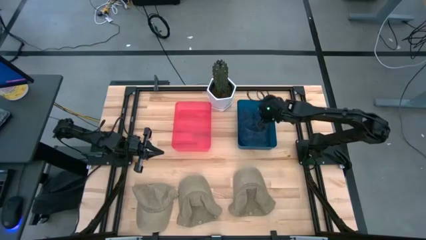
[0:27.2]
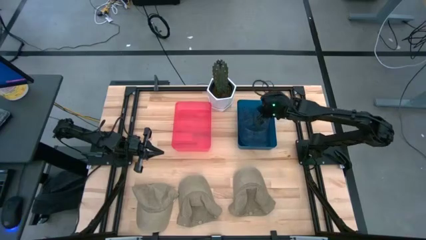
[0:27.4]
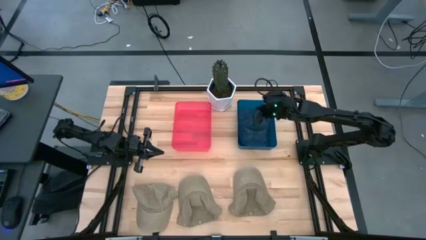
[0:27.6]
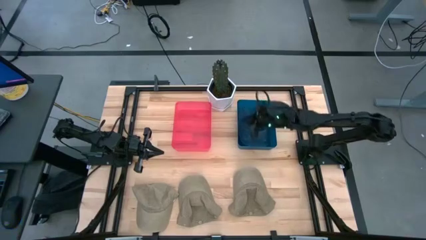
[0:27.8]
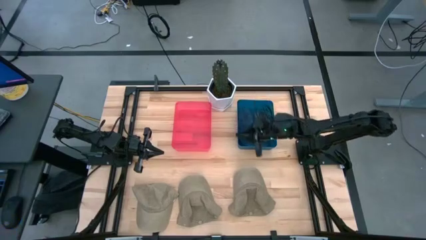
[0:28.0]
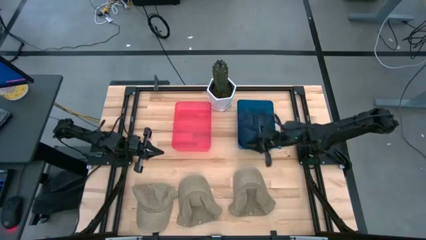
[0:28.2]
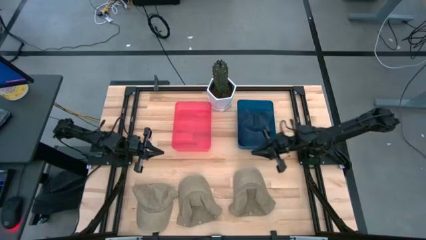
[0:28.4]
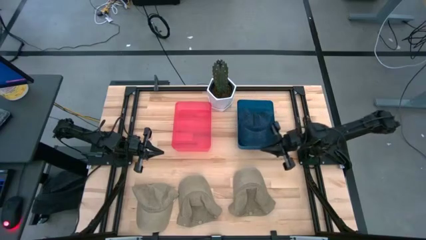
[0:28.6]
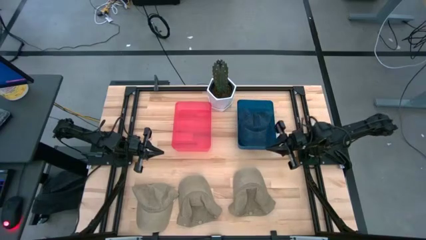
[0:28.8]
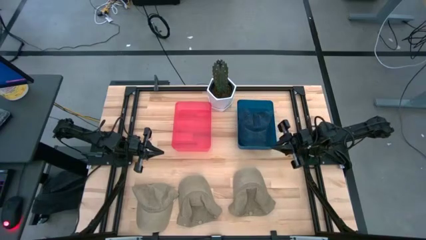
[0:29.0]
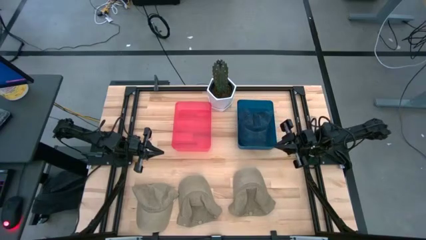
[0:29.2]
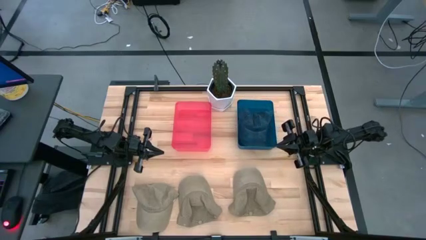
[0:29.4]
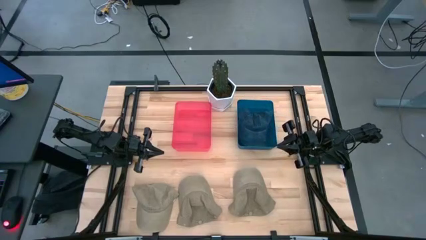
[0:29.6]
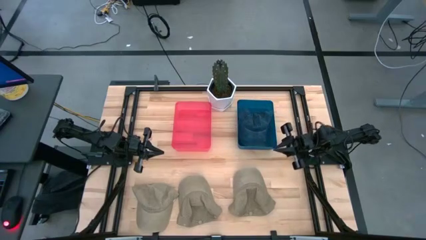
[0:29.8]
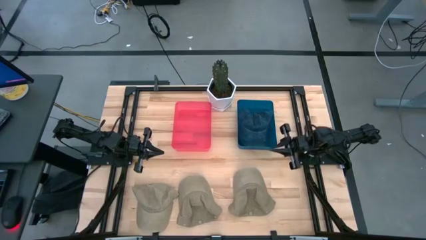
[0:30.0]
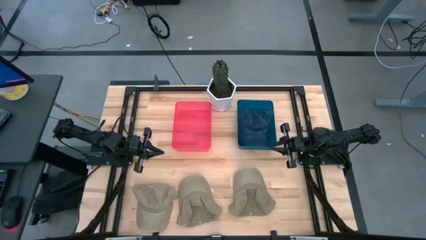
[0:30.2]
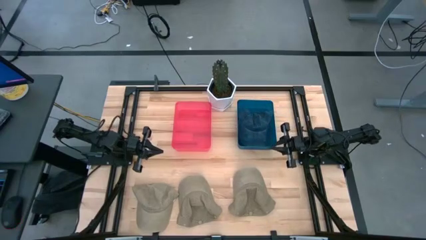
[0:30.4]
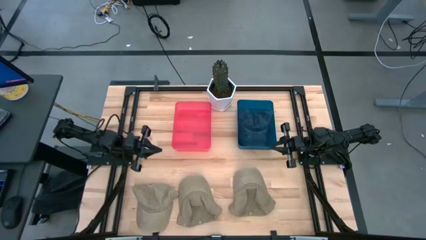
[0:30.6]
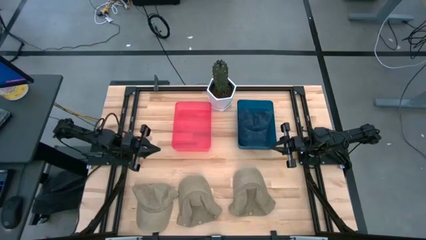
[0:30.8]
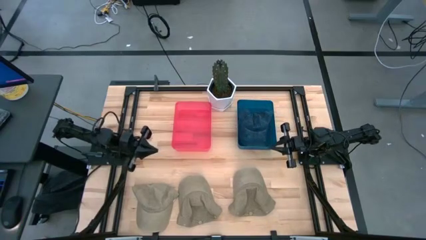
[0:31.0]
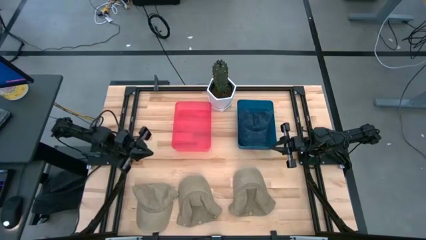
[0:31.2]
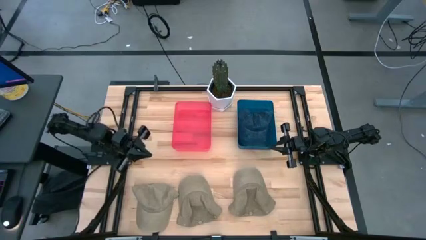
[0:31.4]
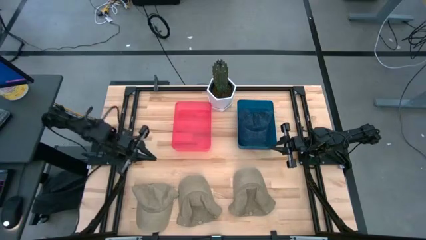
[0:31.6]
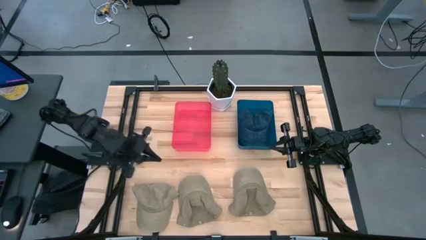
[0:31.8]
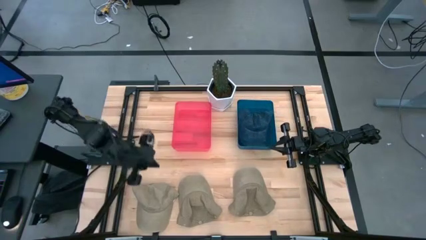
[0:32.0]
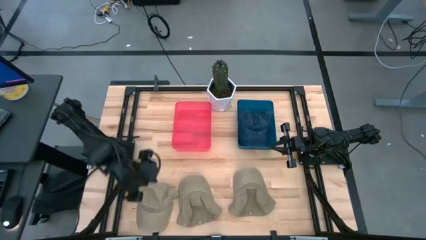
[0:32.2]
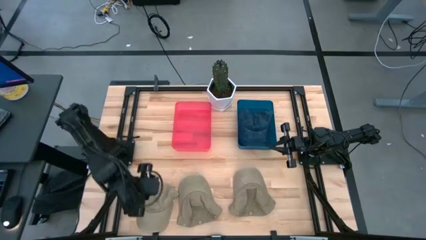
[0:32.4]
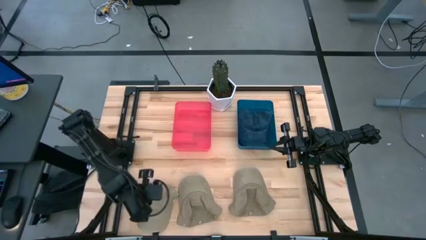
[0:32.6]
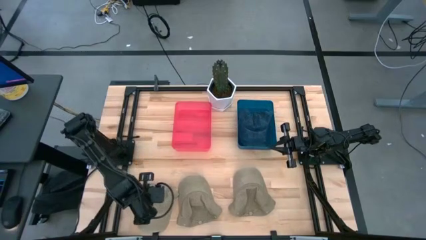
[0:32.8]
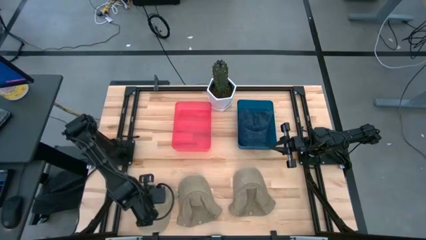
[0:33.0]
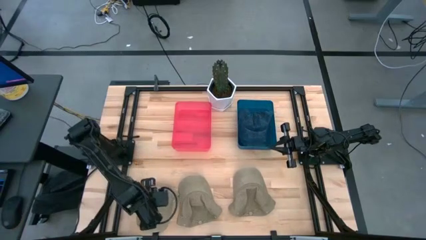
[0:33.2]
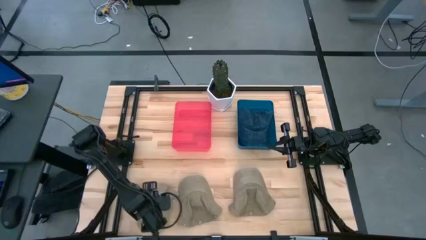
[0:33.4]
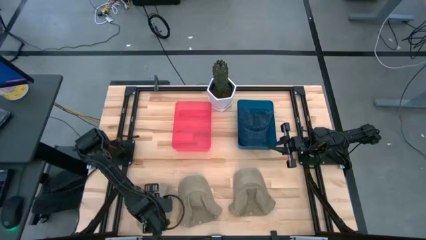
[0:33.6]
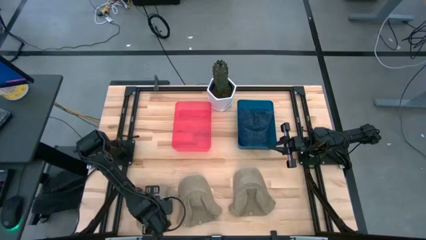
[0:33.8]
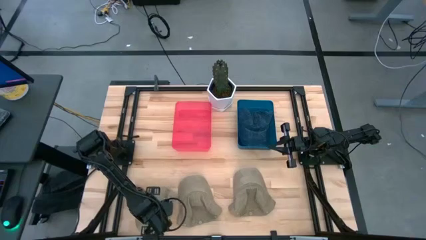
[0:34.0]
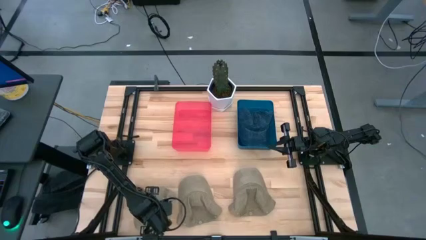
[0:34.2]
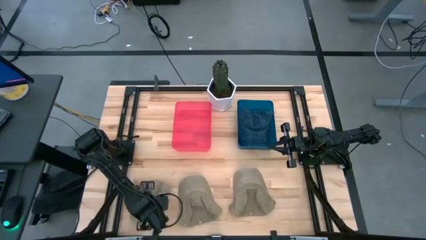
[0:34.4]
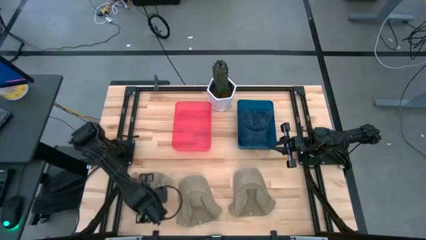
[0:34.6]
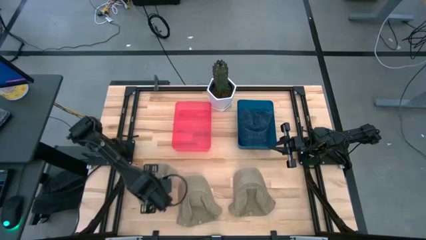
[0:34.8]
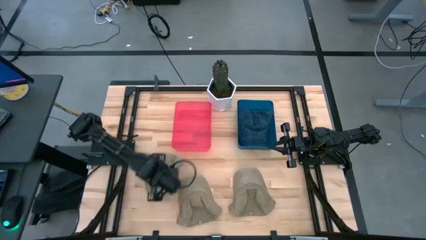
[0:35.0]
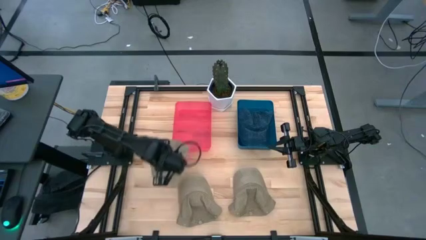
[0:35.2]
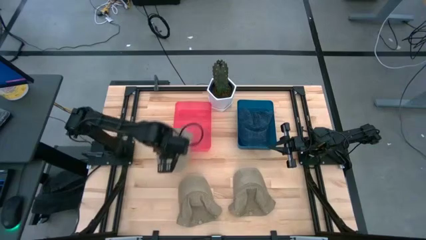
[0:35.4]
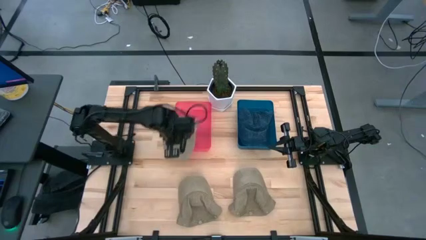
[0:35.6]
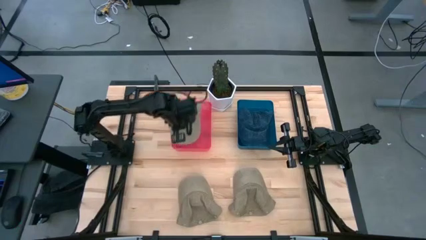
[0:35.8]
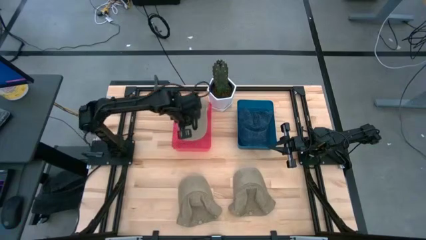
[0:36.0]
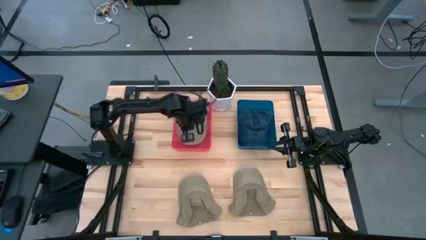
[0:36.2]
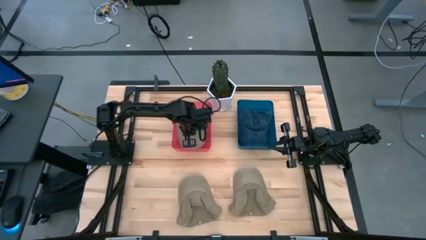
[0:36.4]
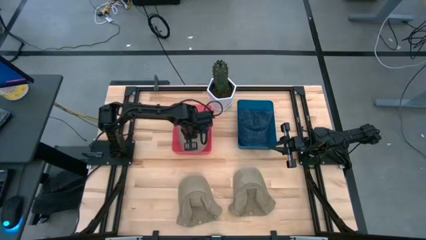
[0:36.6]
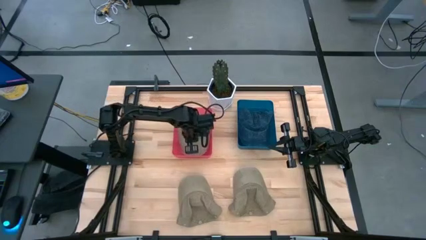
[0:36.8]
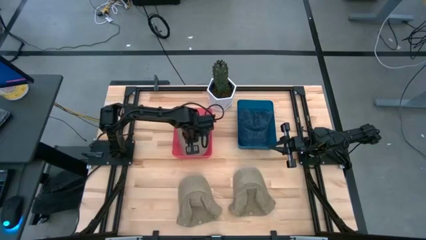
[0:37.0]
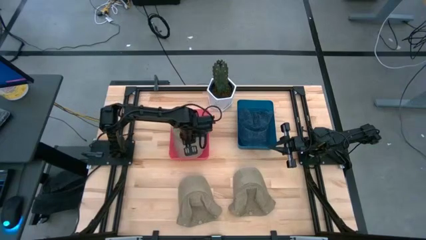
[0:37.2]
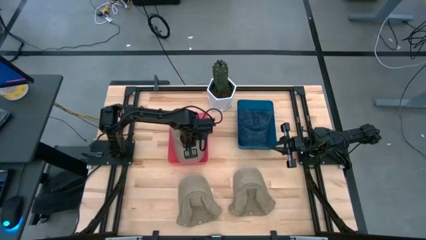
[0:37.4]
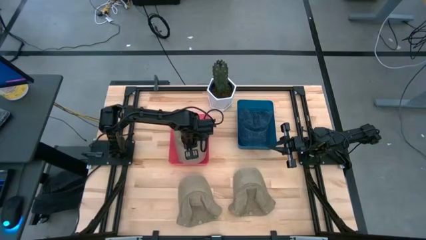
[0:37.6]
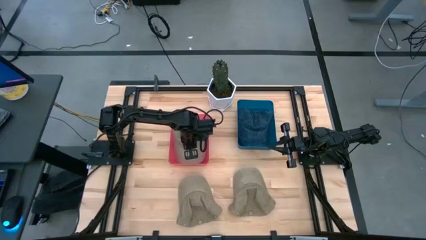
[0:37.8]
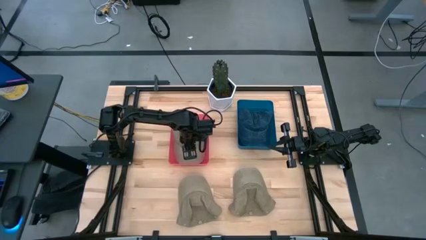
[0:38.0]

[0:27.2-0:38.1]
Task: Pick & Place hat
Put the left brown cap into the red bin

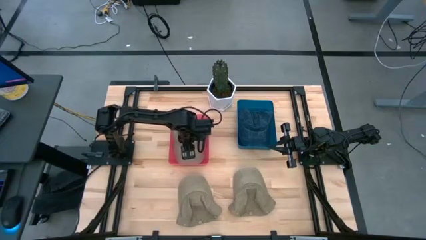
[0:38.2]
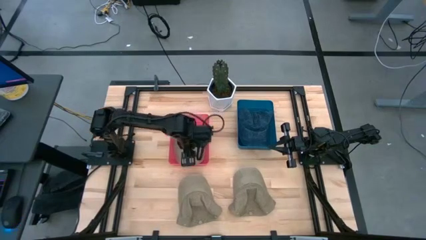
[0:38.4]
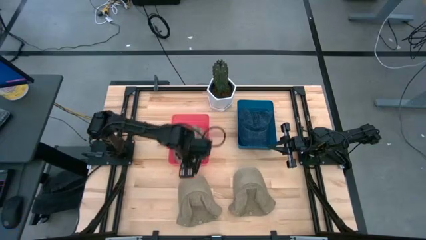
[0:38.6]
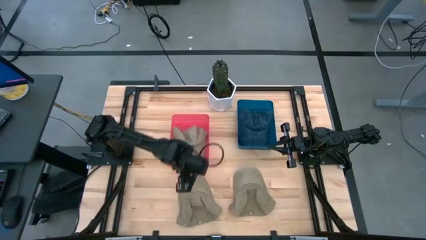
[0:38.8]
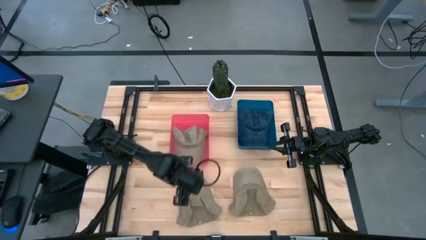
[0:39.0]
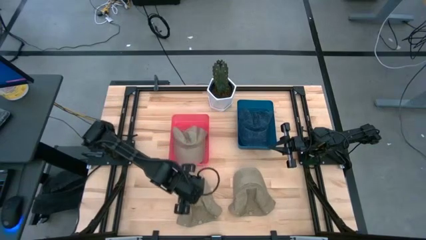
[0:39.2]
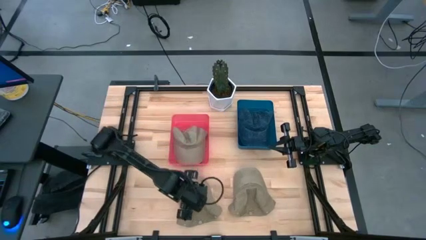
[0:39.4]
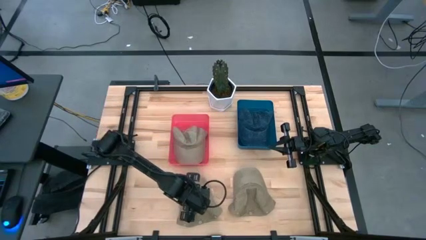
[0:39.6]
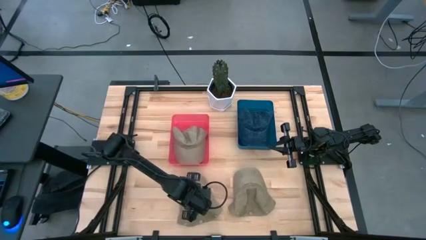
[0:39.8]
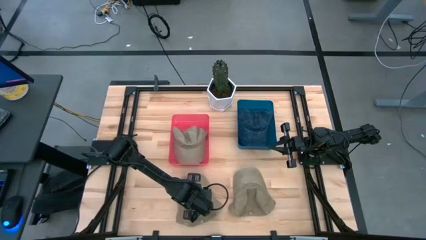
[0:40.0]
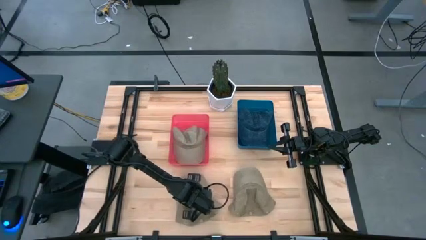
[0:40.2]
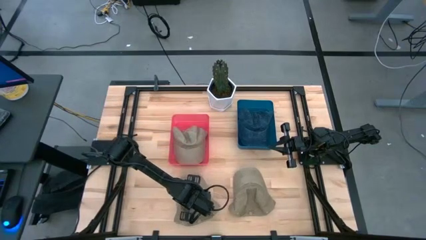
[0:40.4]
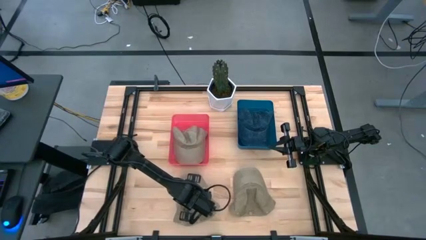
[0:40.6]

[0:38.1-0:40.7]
Put the left brown cap into the red bin
